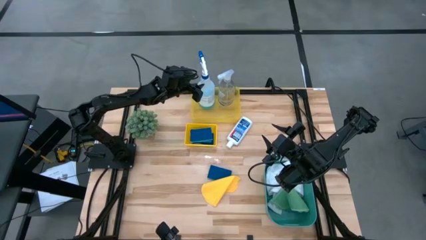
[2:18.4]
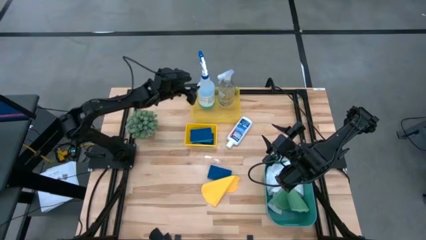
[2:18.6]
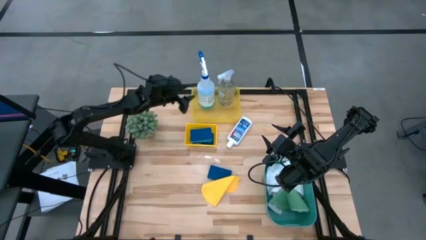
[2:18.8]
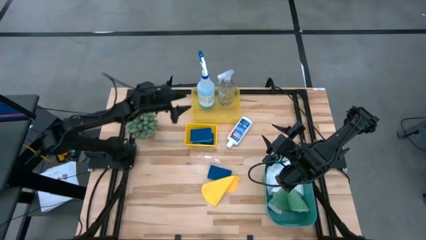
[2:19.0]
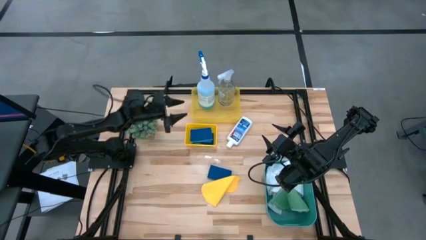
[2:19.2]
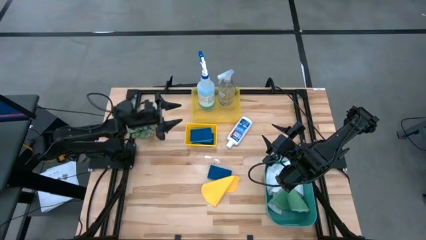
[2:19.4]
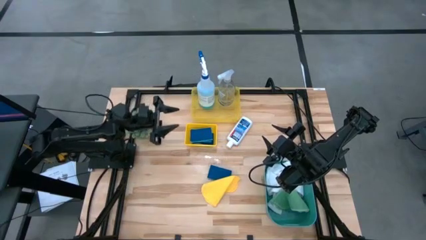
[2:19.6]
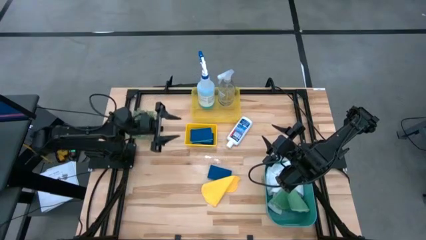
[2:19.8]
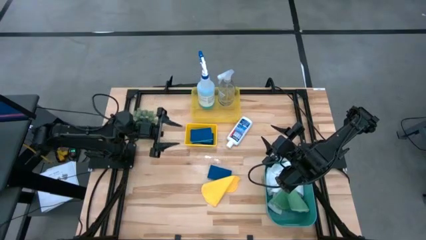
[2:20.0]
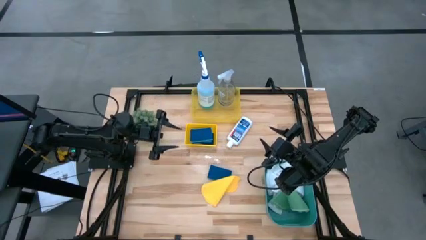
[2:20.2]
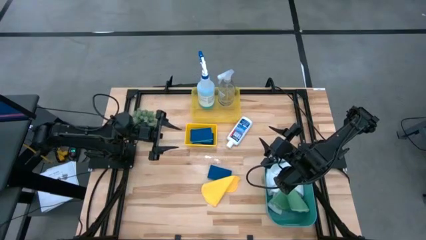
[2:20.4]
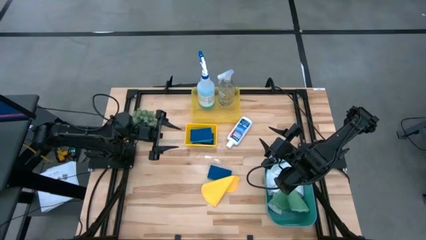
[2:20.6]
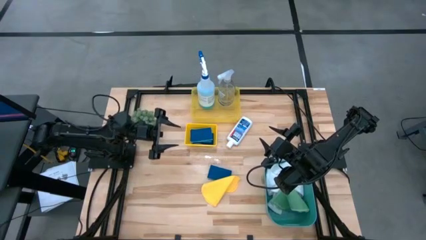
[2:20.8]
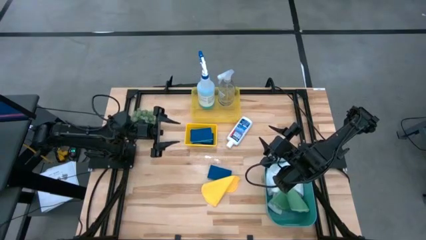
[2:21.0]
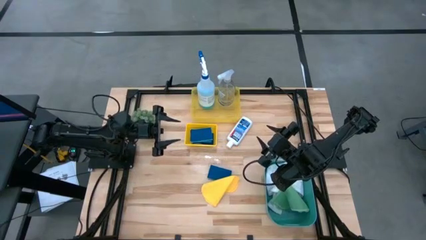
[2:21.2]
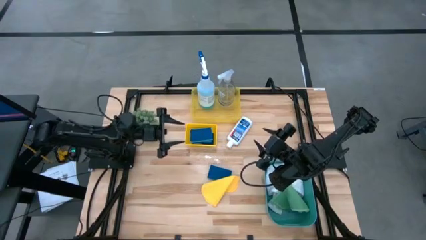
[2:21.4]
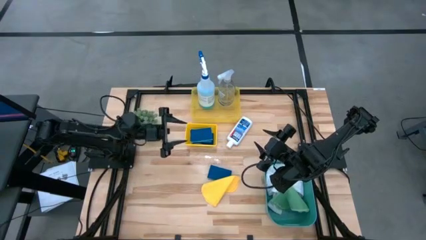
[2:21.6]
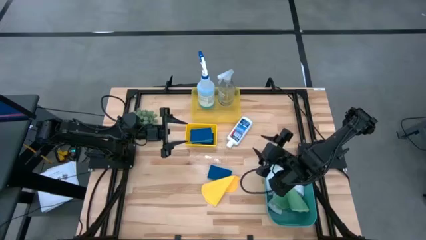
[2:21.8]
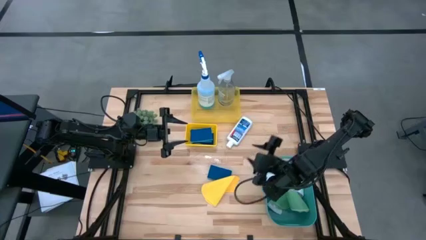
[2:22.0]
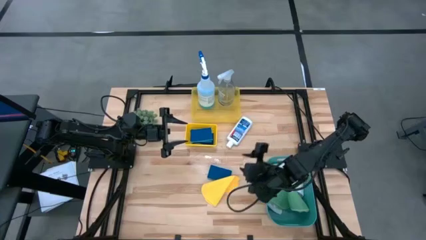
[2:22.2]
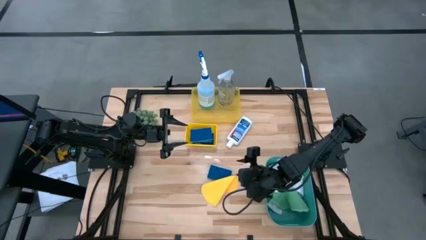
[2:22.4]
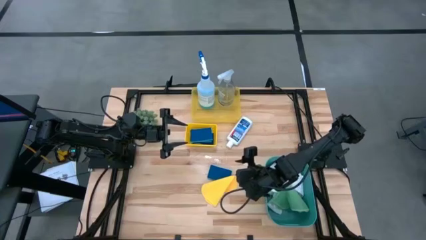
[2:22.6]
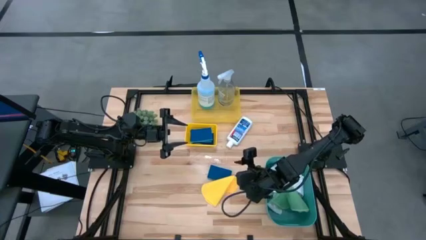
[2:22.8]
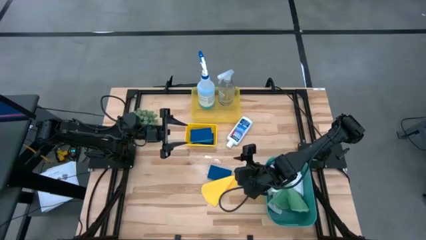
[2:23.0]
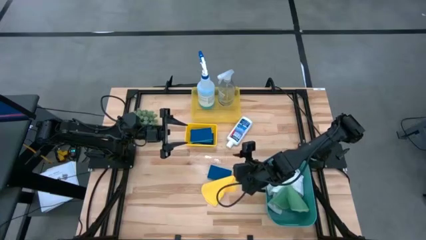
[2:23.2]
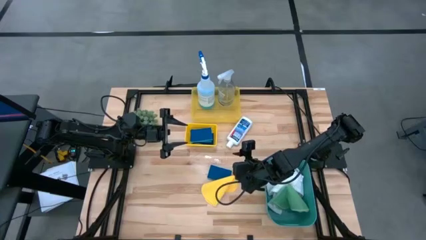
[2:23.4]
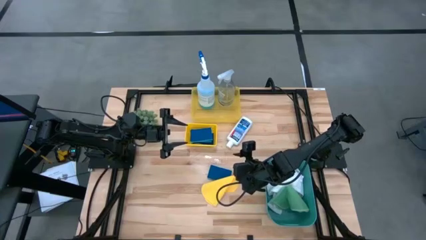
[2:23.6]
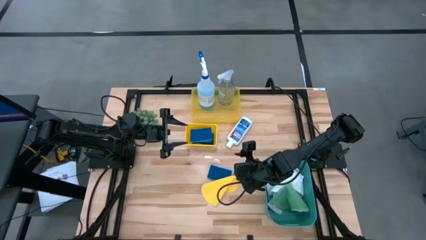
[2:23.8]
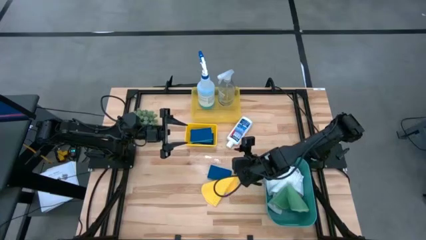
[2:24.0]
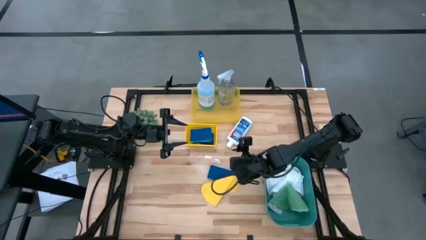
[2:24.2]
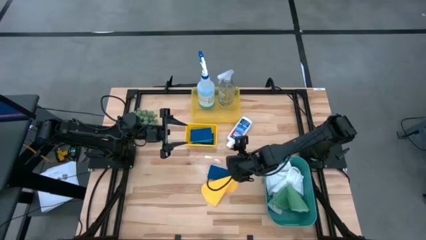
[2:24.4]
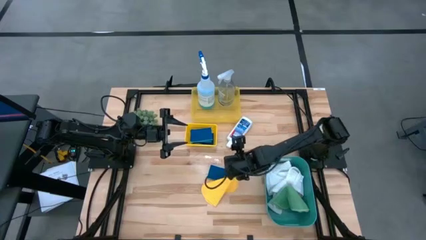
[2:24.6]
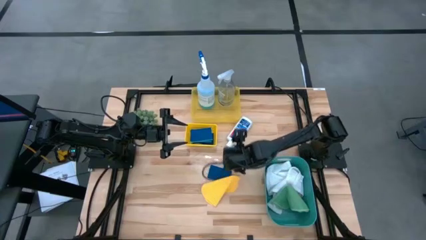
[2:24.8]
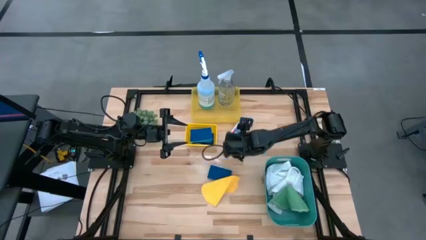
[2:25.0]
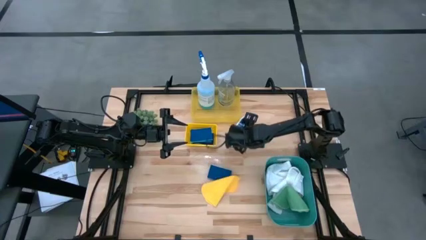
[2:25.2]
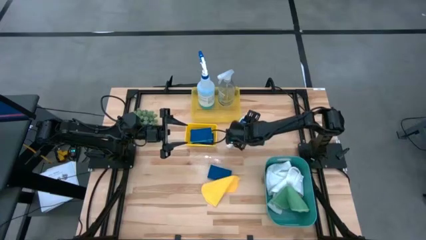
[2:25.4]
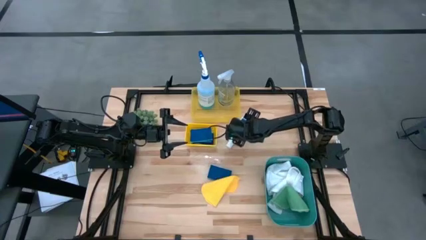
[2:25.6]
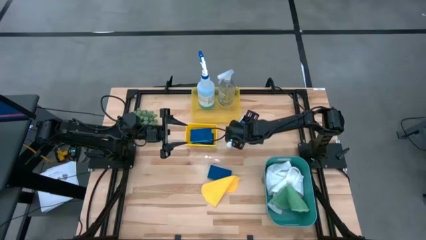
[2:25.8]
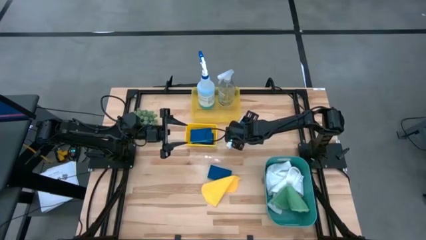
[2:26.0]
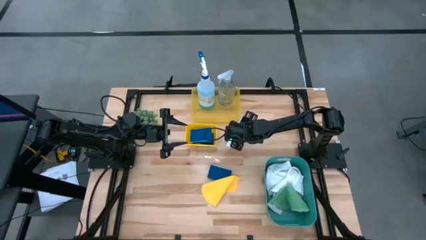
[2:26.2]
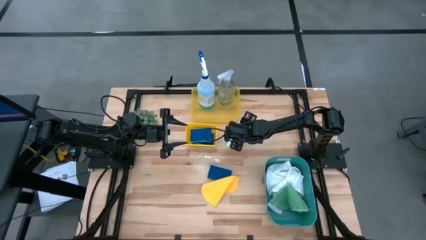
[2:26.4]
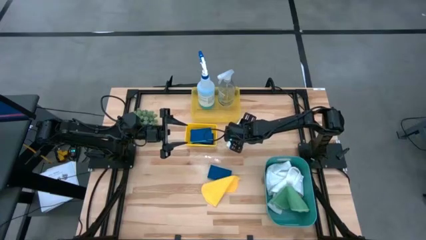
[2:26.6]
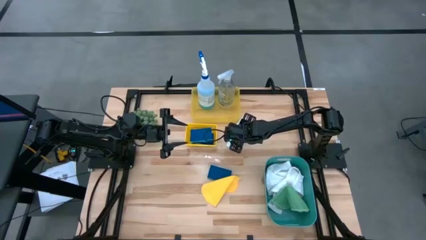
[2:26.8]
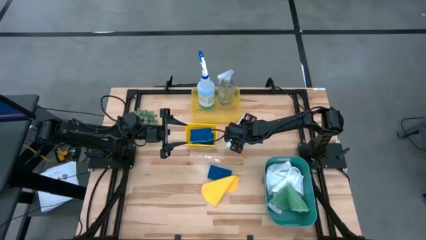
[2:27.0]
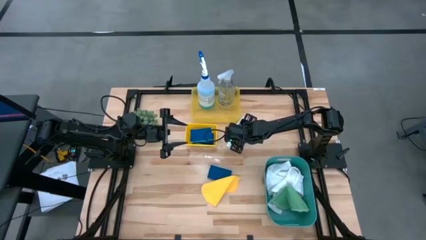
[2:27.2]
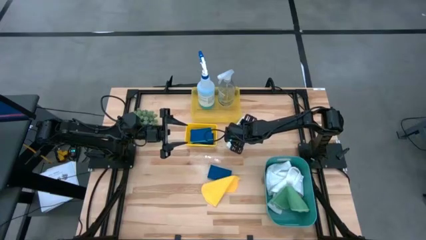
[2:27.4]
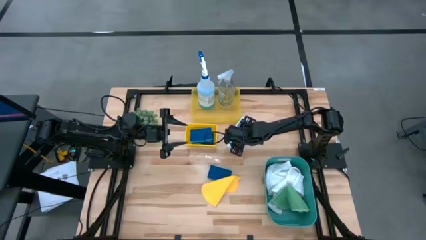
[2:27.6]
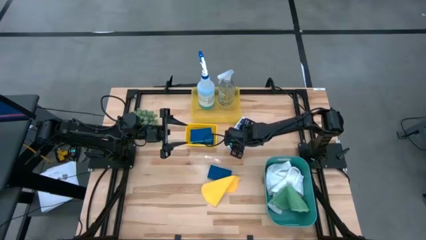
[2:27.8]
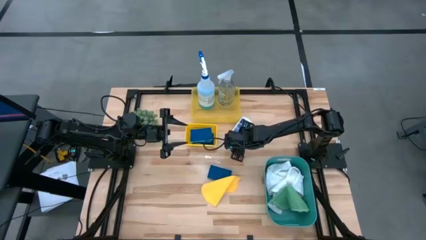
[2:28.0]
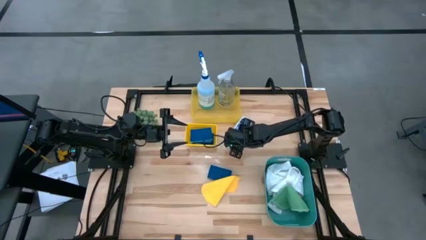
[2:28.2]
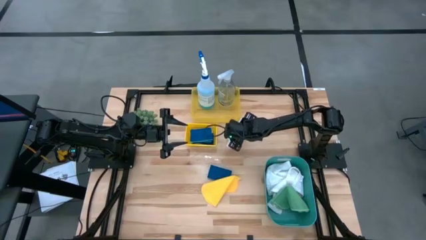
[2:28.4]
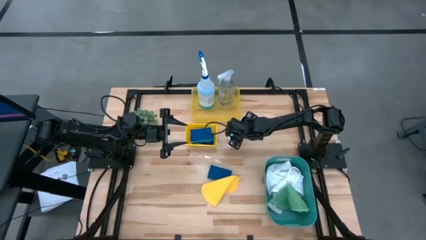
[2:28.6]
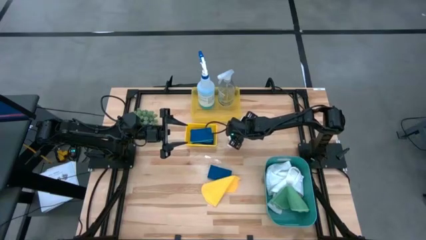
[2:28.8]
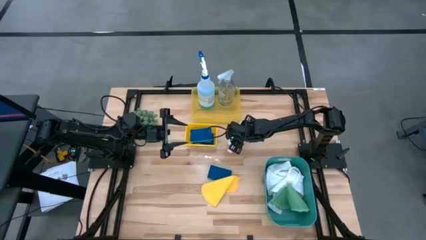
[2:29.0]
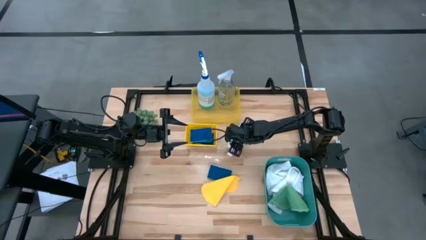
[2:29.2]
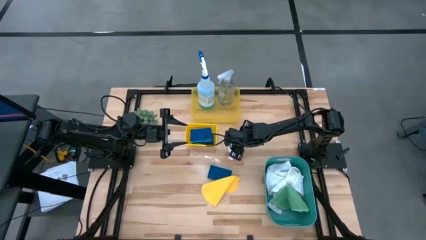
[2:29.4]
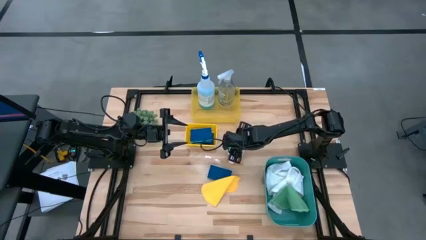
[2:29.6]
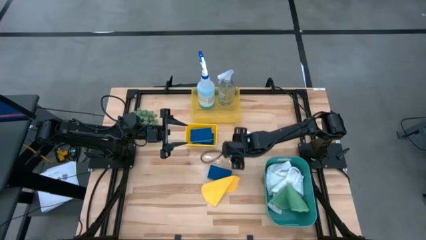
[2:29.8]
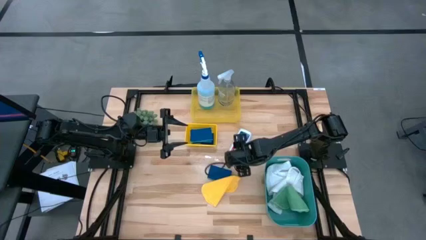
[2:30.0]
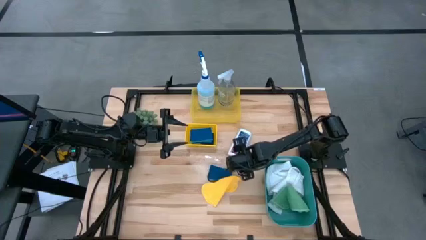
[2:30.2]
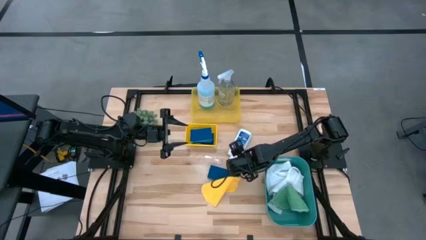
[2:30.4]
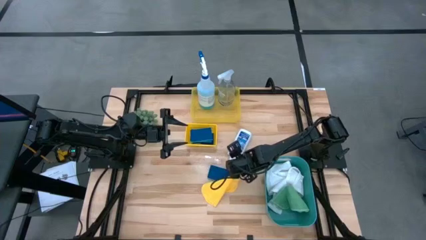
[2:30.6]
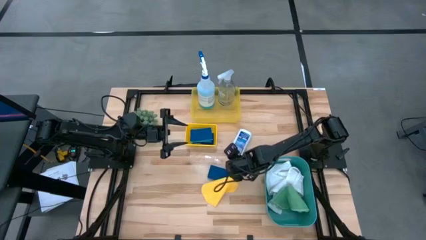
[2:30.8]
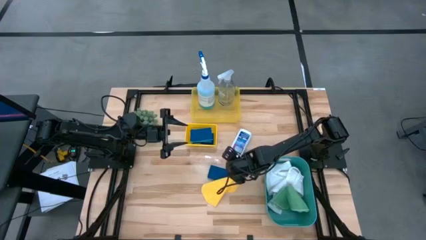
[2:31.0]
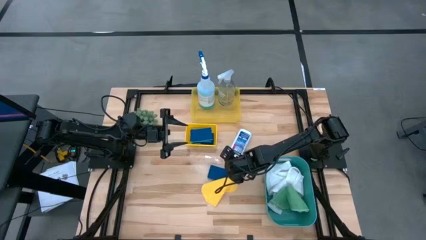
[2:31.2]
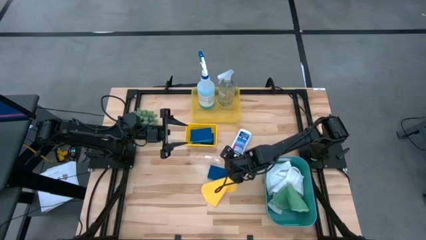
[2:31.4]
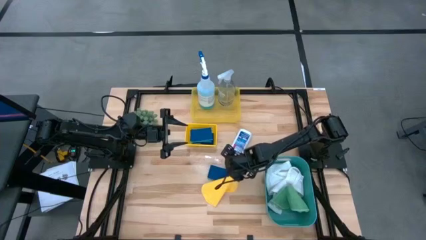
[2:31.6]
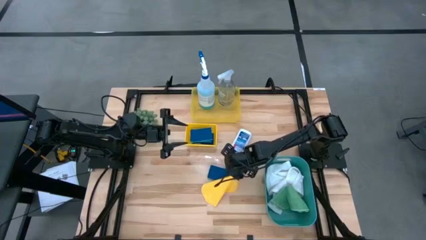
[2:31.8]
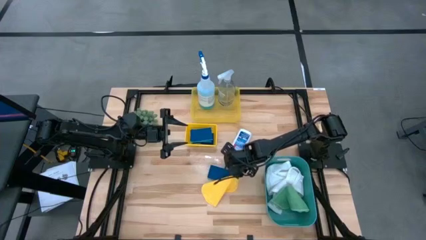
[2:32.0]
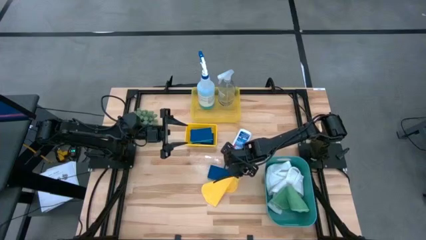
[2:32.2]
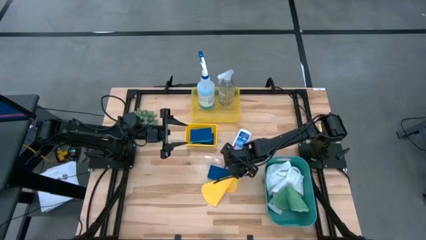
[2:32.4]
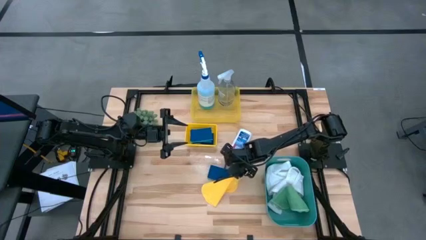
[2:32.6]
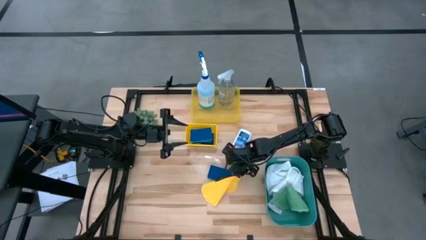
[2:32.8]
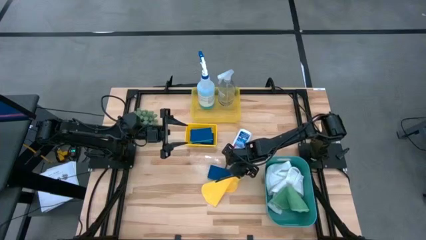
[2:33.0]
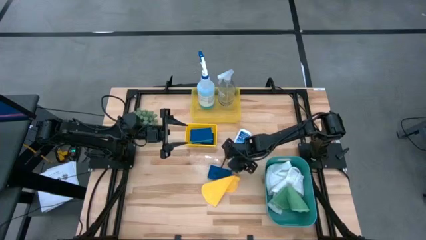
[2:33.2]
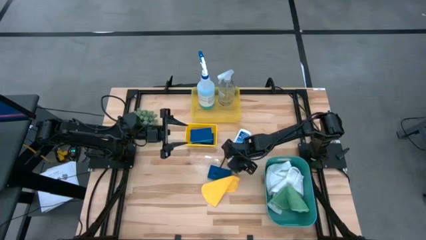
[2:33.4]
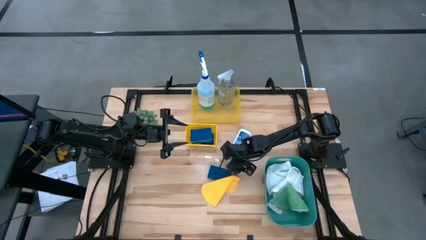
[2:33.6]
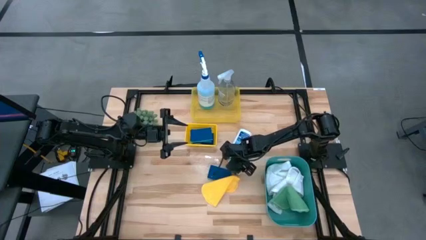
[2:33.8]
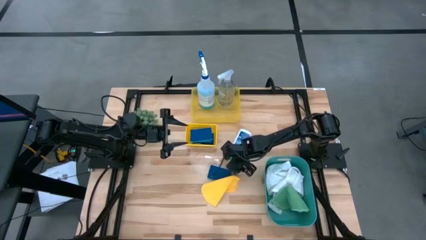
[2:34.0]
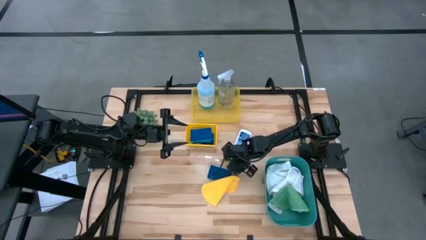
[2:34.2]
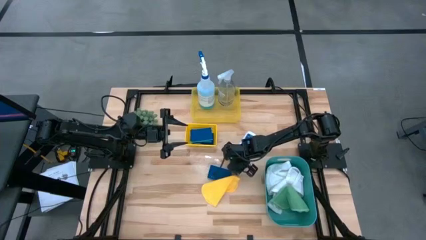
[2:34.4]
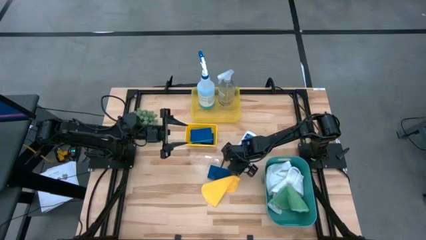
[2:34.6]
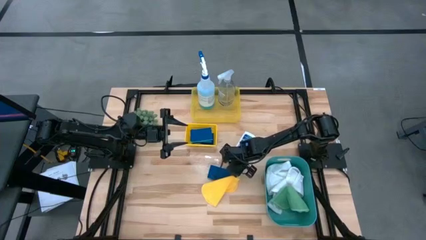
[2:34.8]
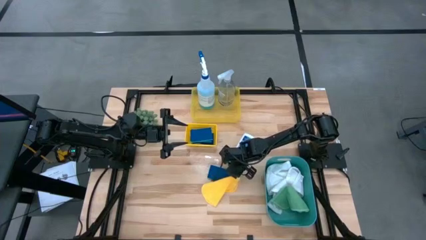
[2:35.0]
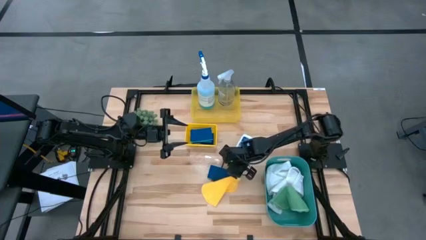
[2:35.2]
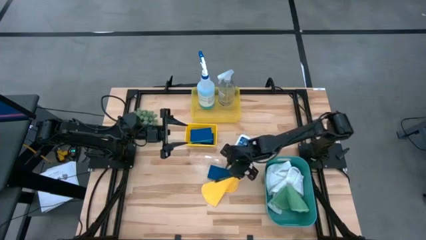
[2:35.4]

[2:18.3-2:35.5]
Task: Pick & Place Kitchen Items
Put the plastic restorer bottle into the top yellow bin
